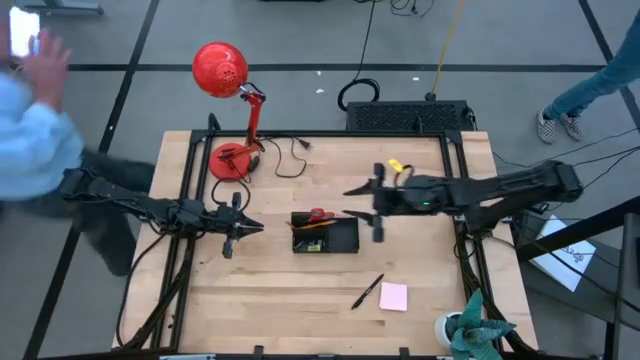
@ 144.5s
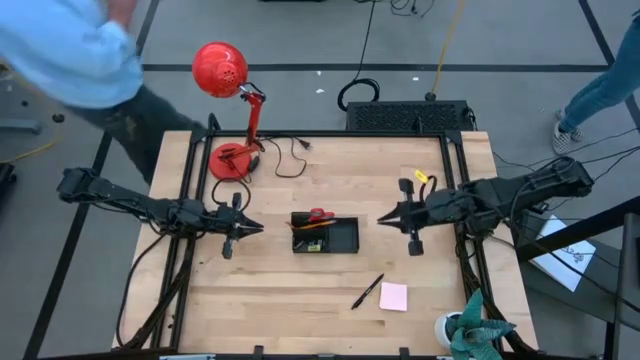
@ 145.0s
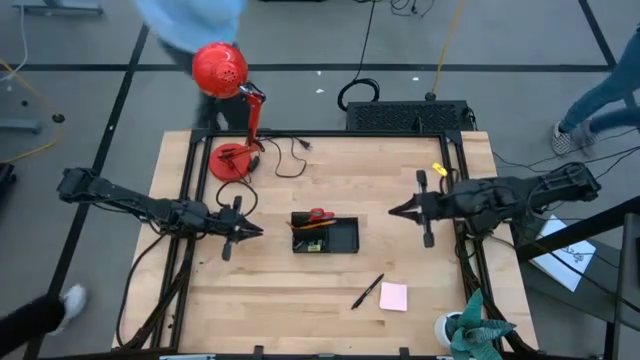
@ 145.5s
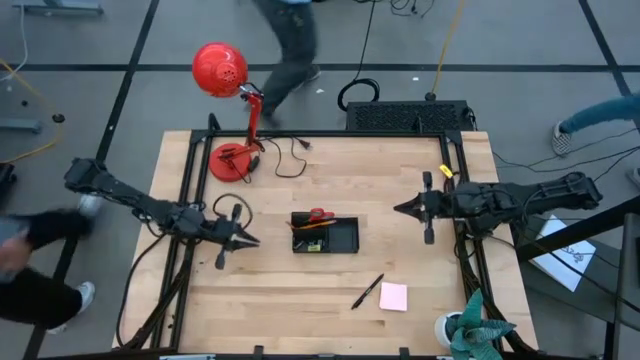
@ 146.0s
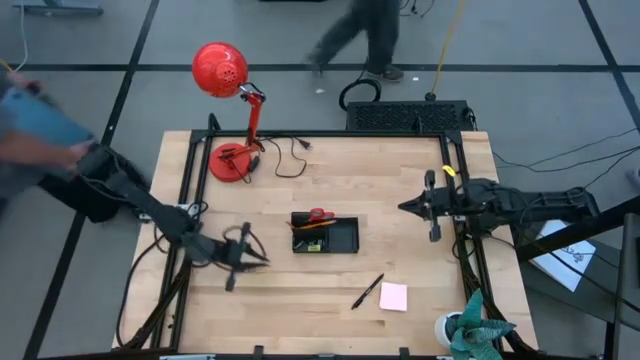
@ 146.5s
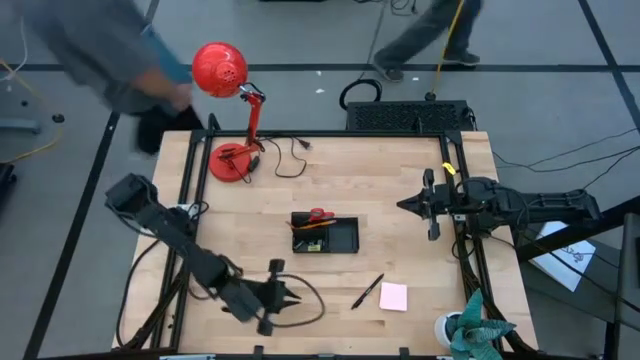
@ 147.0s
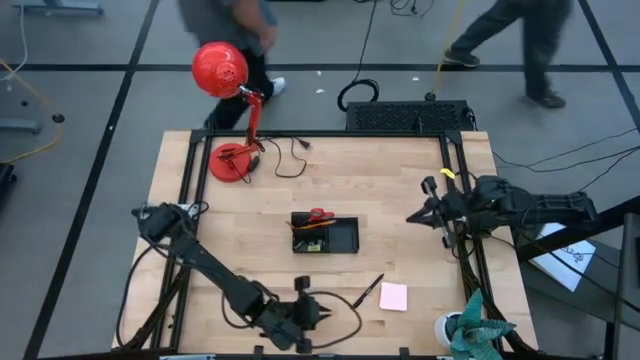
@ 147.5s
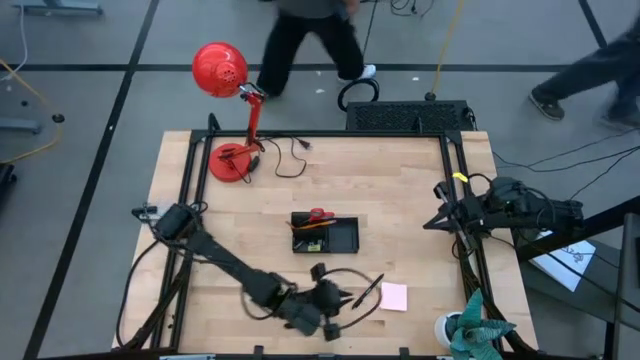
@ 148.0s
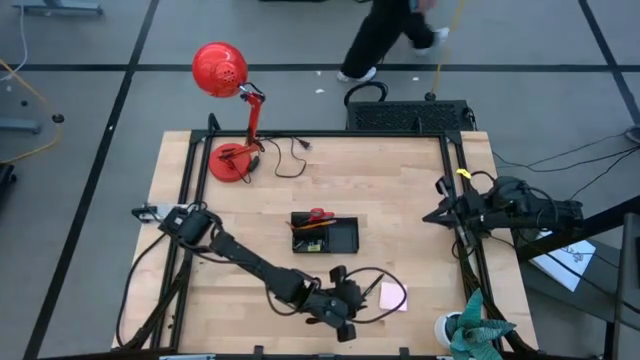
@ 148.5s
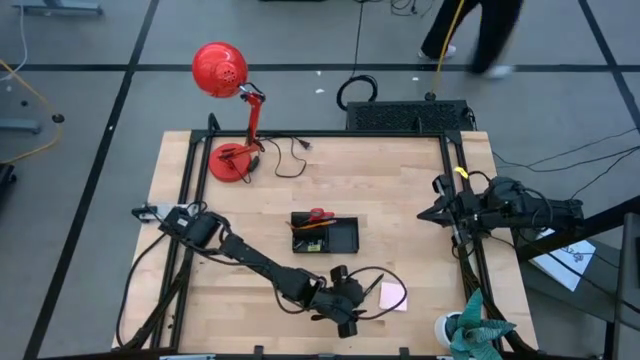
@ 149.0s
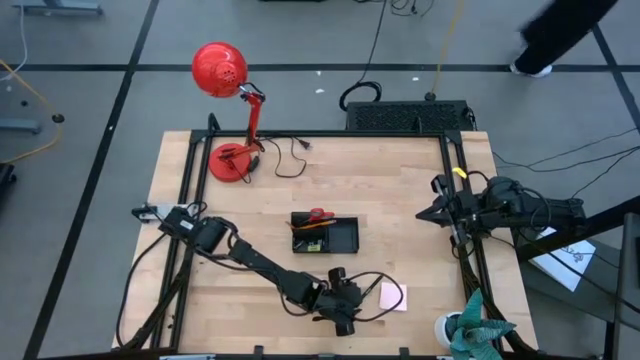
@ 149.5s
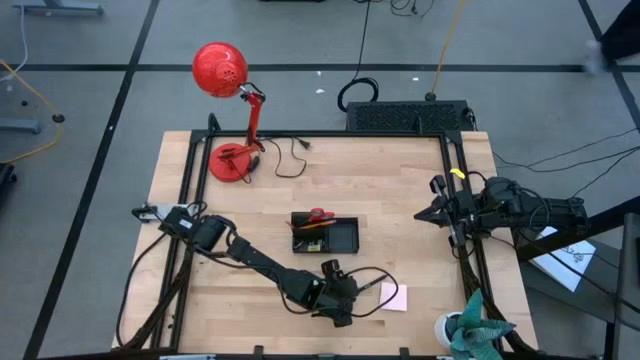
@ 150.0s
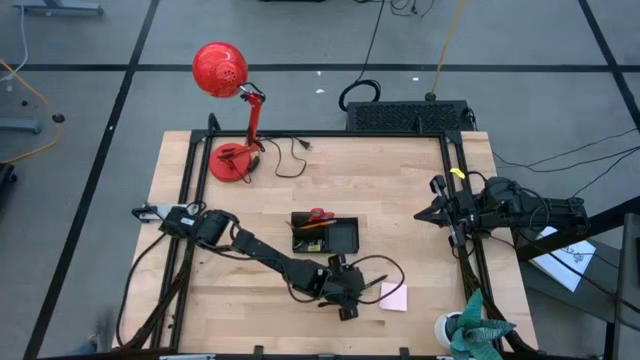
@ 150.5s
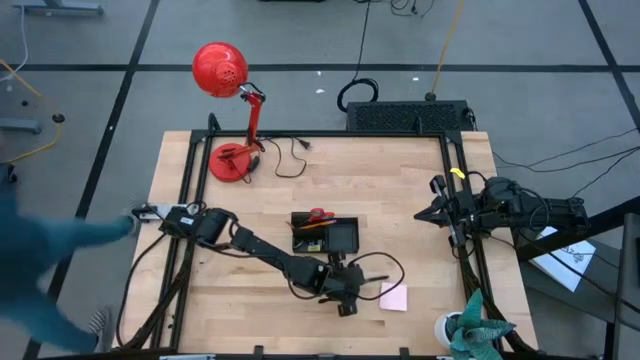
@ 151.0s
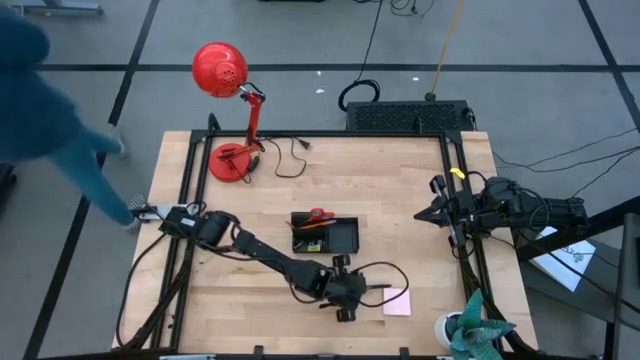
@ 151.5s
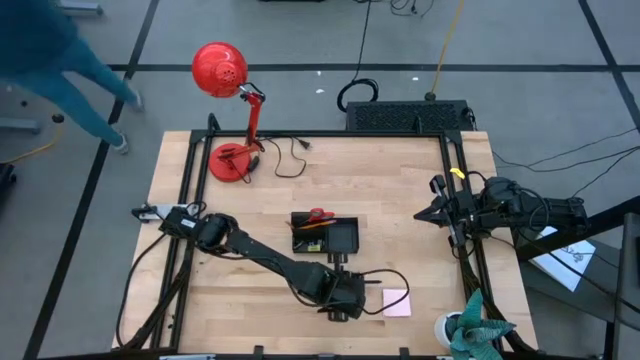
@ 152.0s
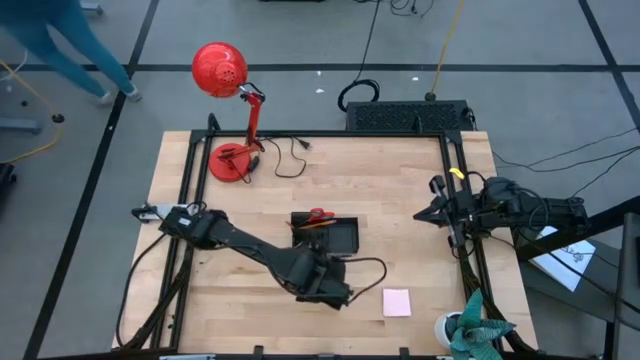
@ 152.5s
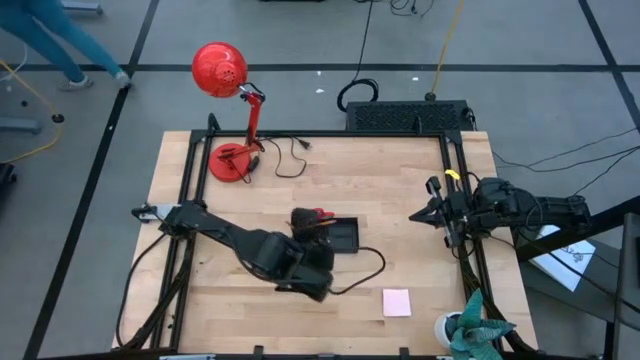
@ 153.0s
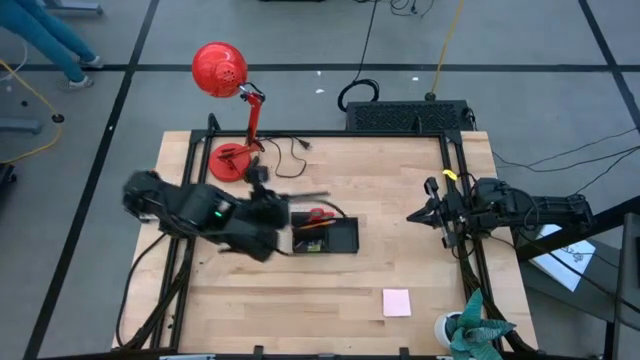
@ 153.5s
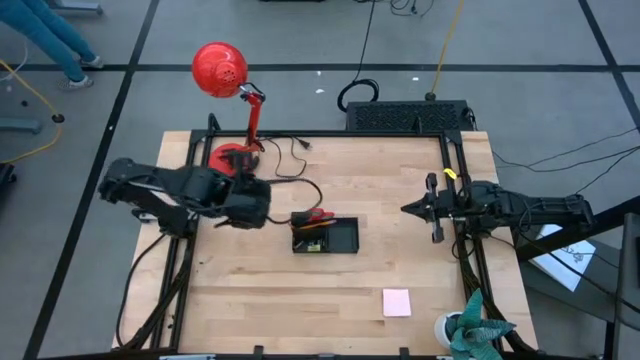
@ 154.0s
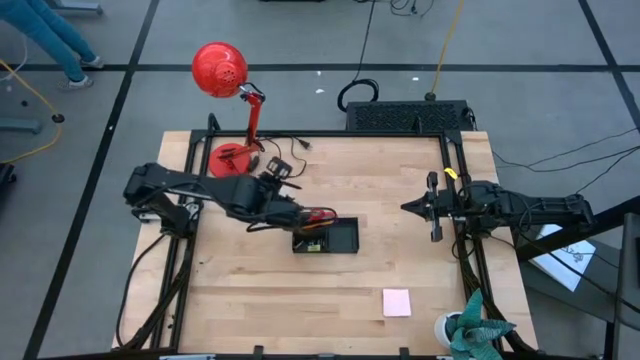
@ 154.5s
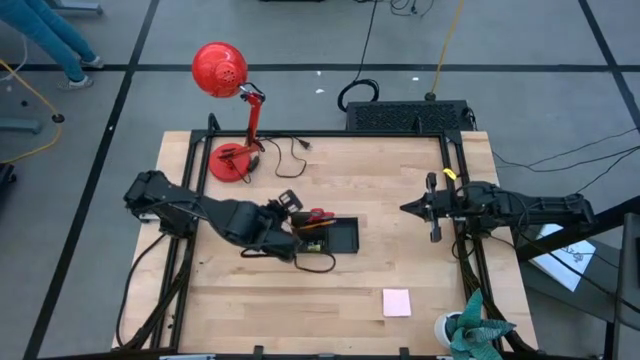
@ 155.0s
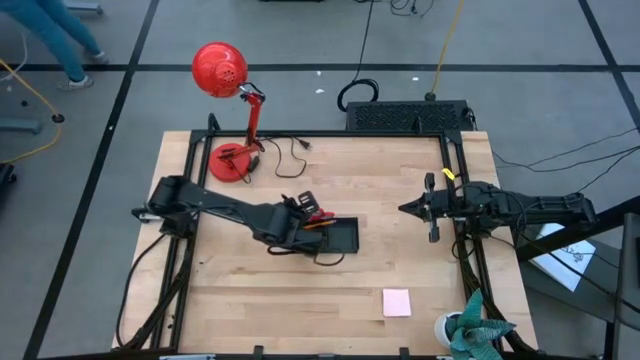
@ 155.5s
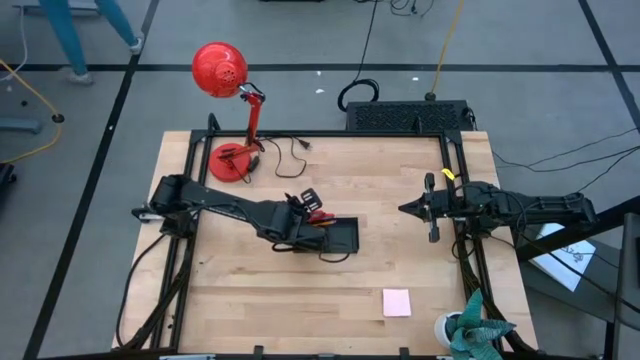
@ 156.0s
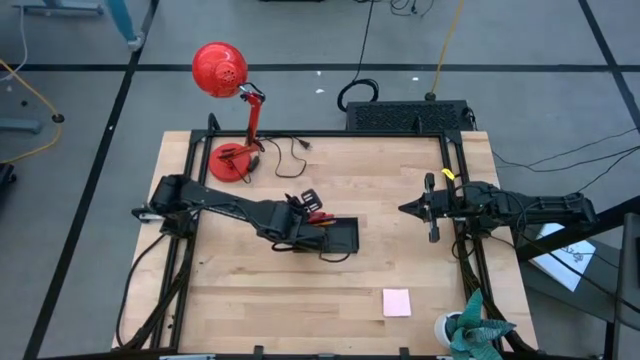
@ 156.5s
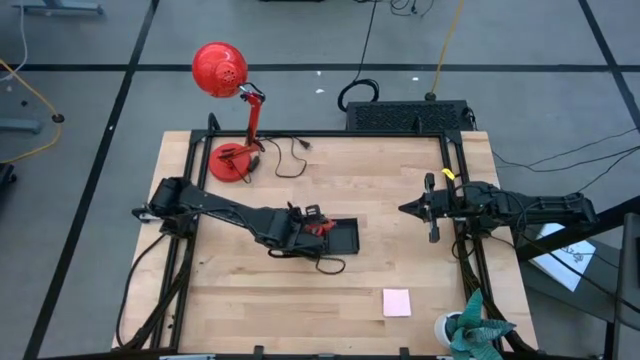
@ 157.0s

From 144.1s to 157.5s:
Task: Pick and place office supplies into organizer
Put the pen into the top left section of the desk organizer

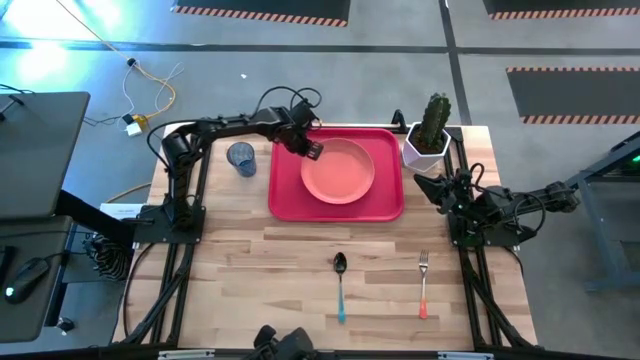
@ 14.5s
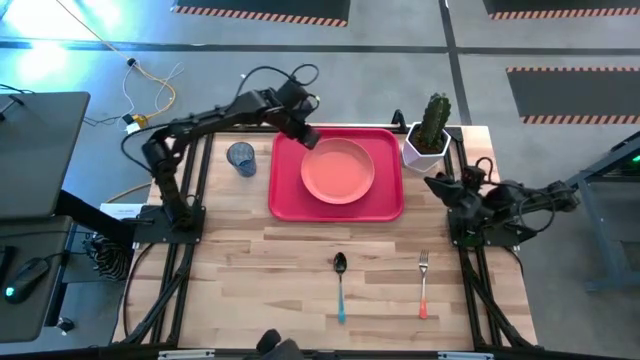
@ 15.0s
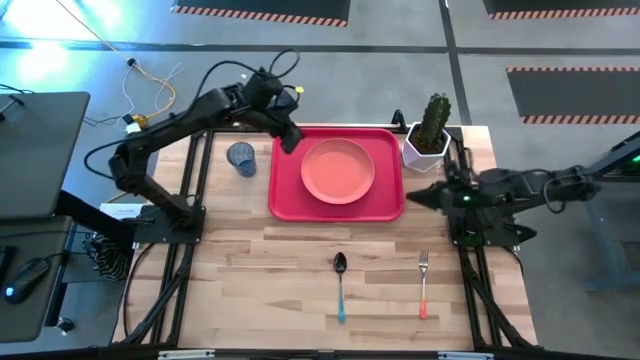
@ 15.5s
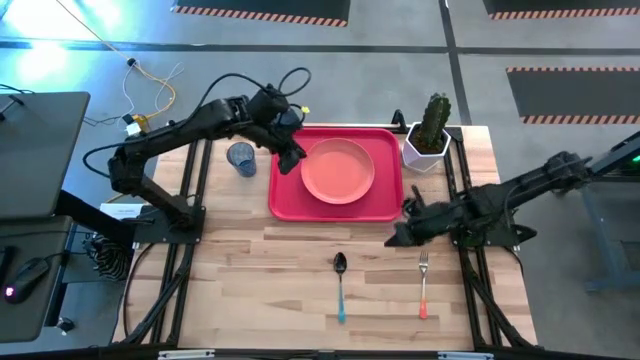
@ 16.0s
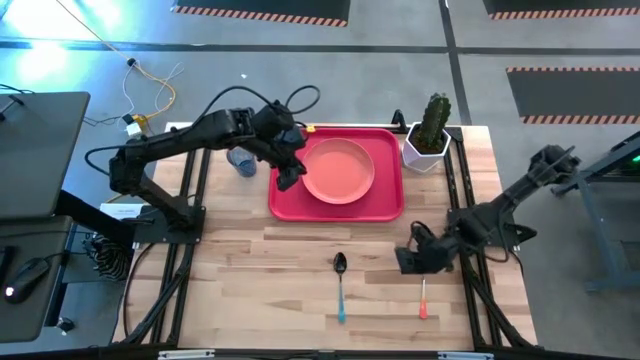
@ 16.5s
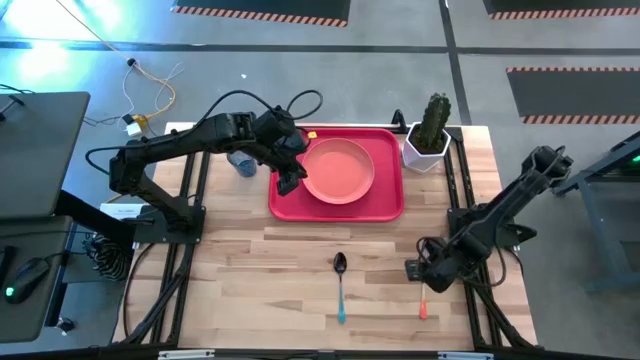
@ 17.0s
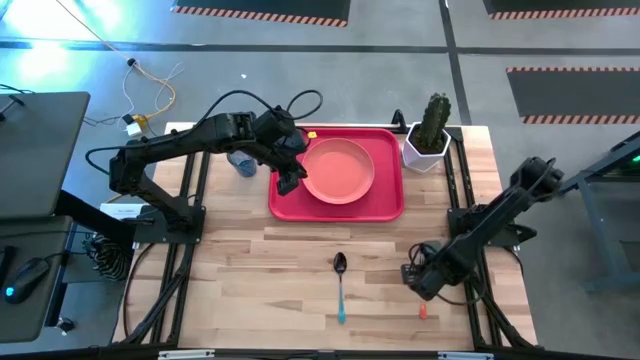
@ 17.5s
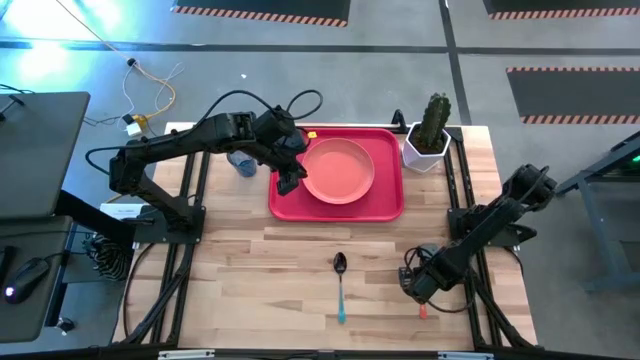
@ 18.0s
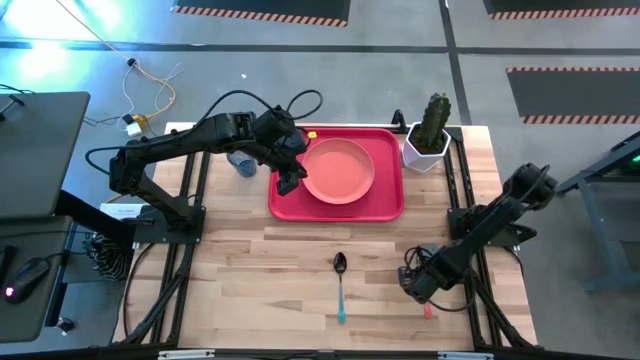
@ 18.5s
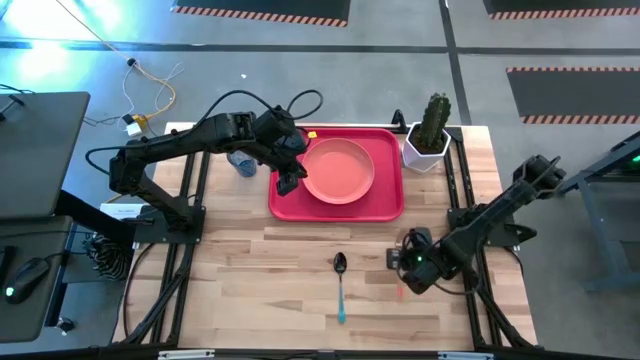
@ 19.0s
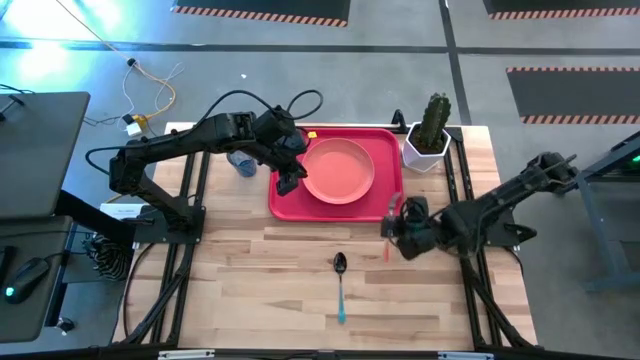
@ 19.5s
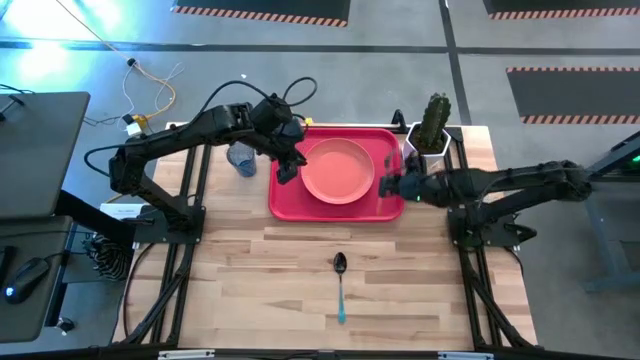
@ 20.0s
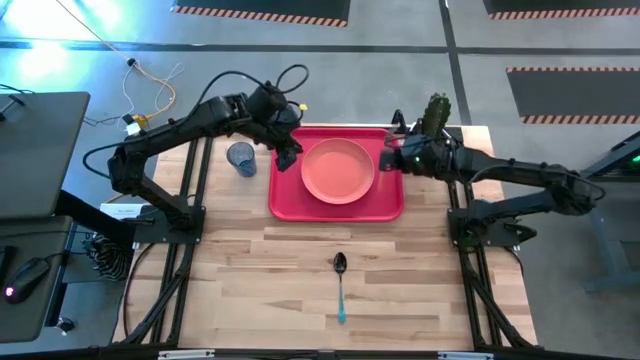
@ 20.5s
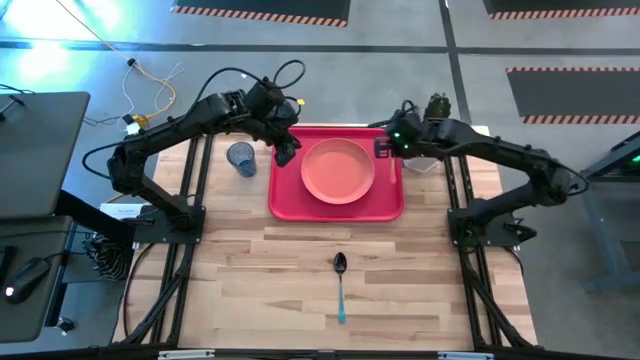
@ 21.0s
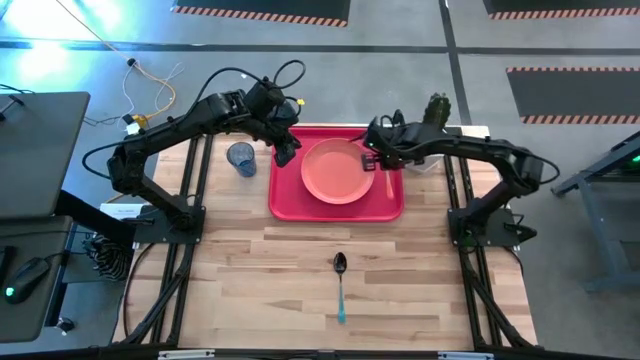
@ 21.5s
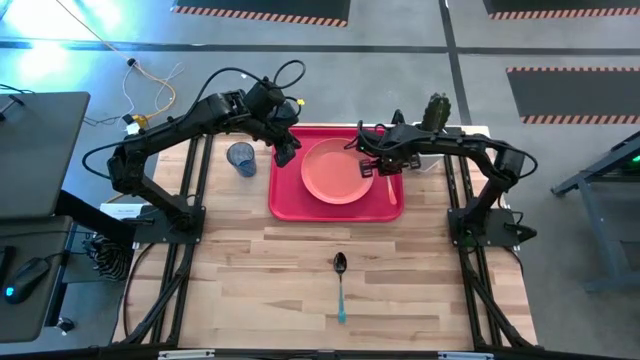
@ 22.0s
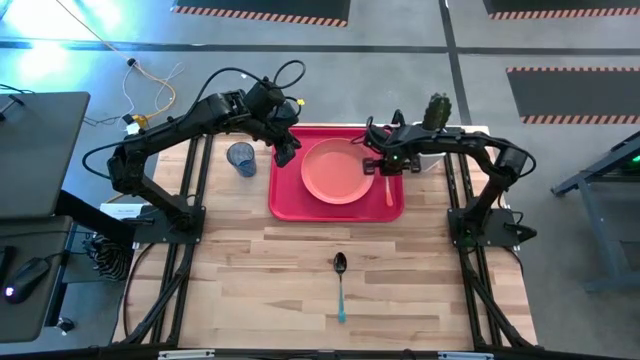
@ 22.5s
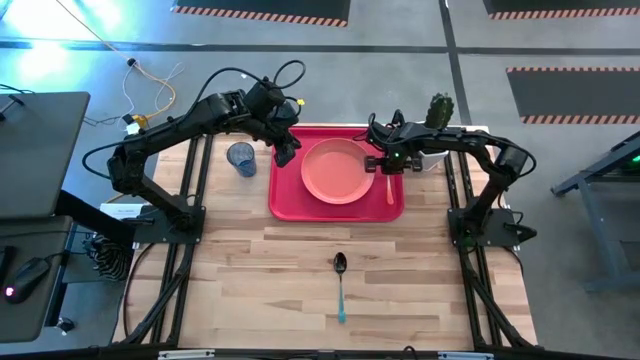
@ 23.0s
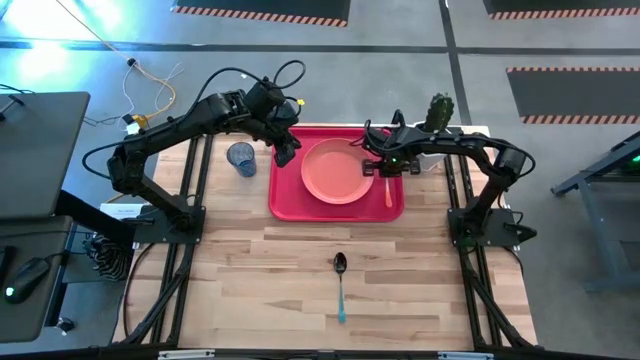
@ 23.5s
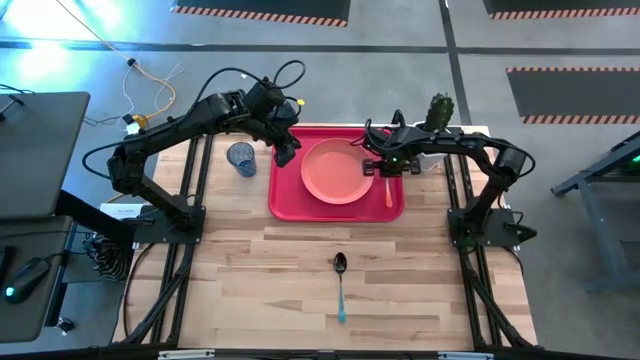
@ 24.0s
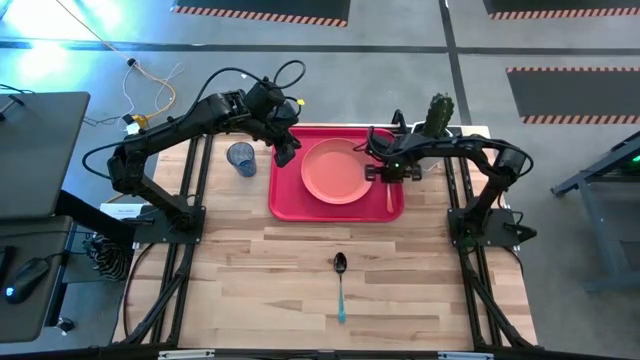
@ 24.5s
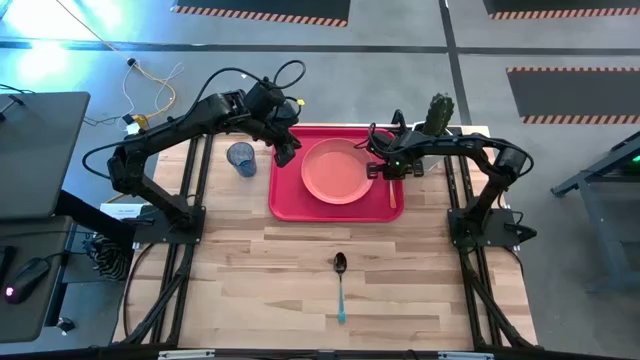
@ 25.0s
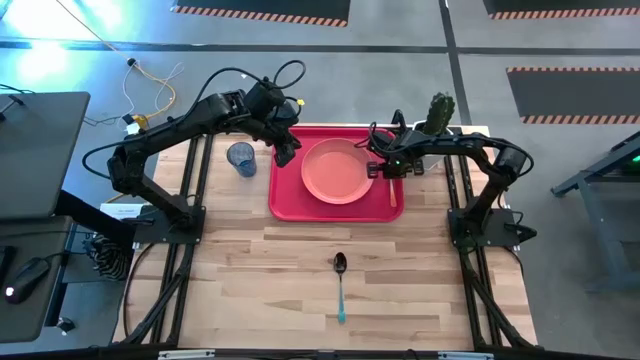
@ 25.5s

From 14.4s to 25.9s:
Task: Pick and place plate/cup/fork/spoon on tray
Put the white orange fork on the right side of the orange plate
